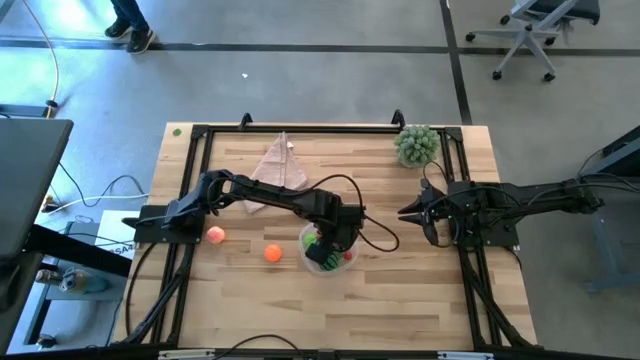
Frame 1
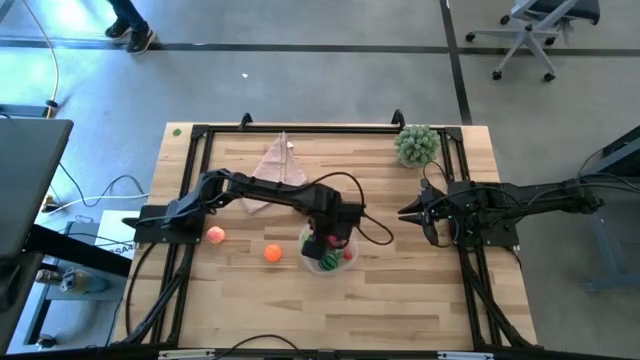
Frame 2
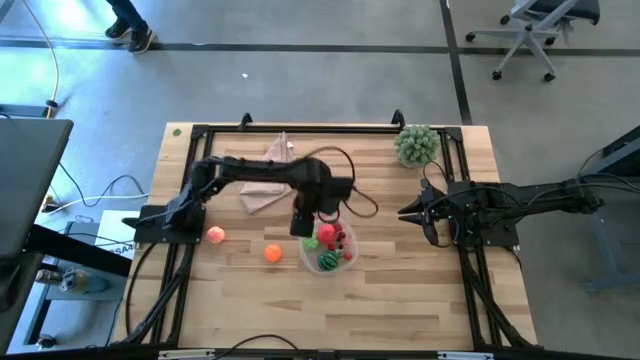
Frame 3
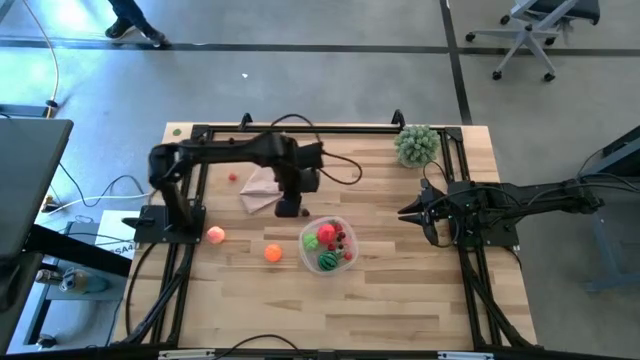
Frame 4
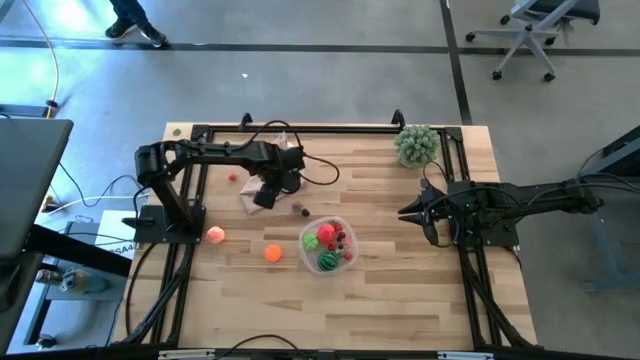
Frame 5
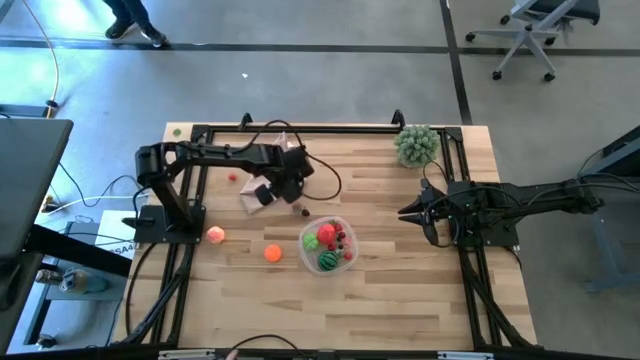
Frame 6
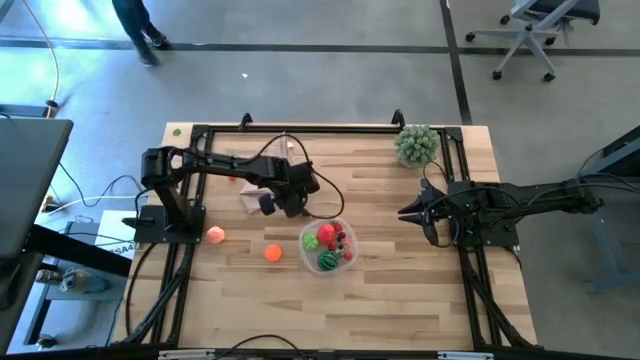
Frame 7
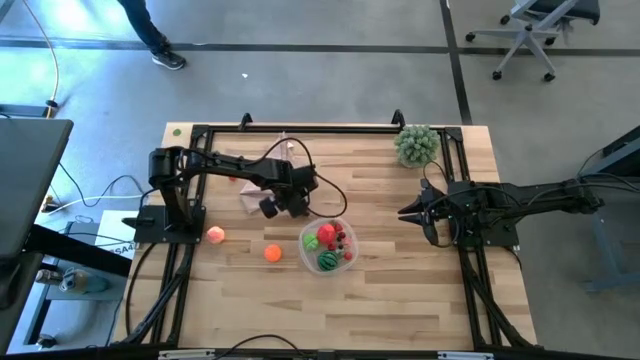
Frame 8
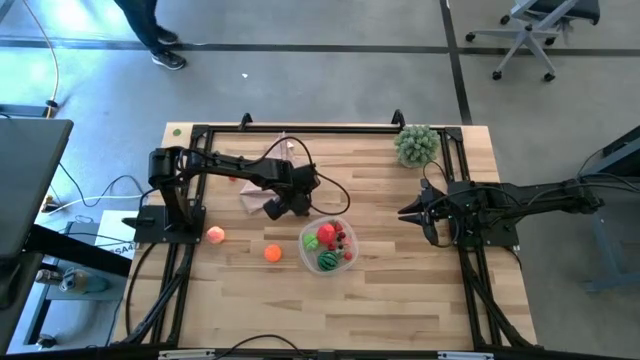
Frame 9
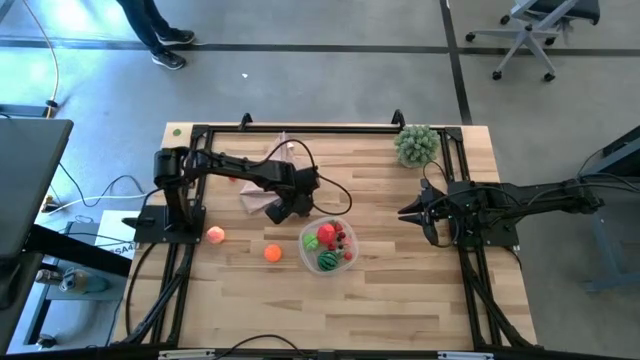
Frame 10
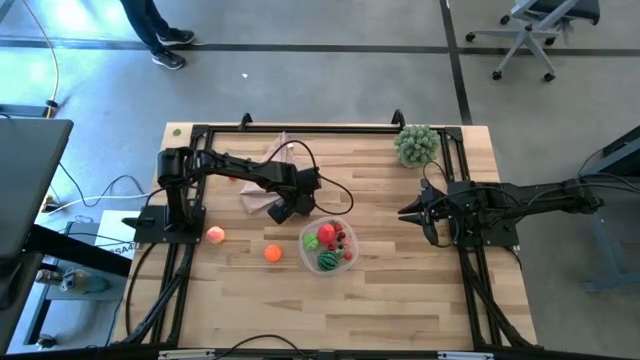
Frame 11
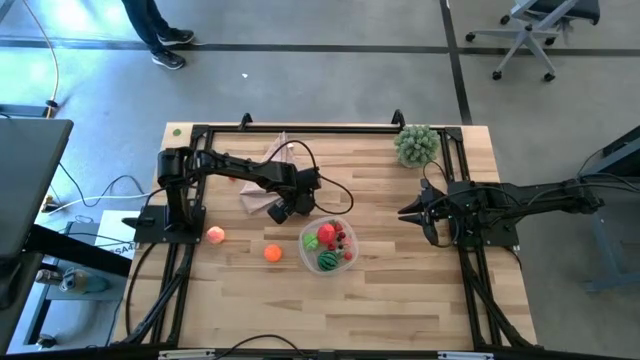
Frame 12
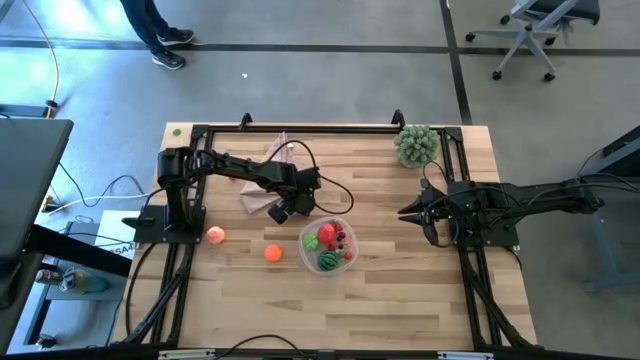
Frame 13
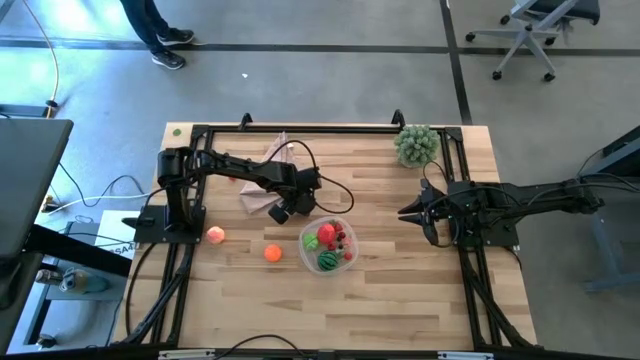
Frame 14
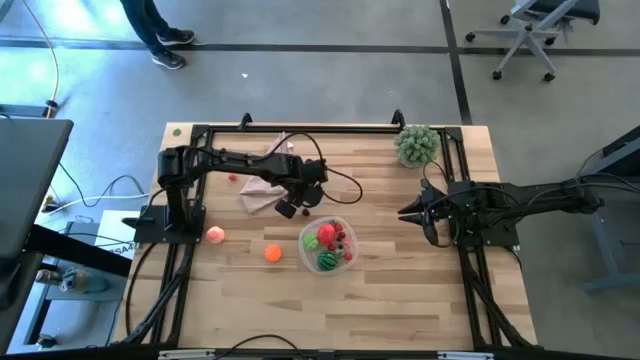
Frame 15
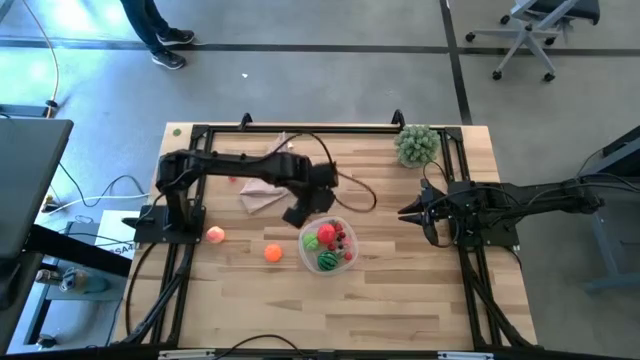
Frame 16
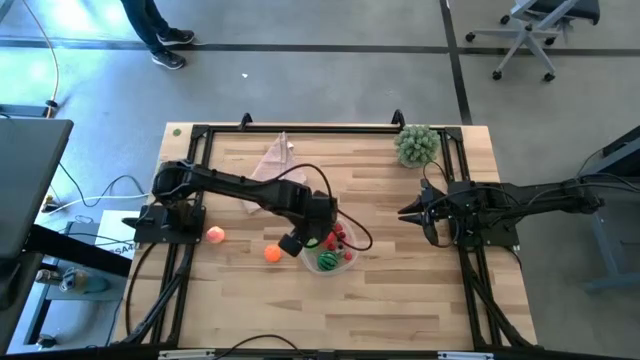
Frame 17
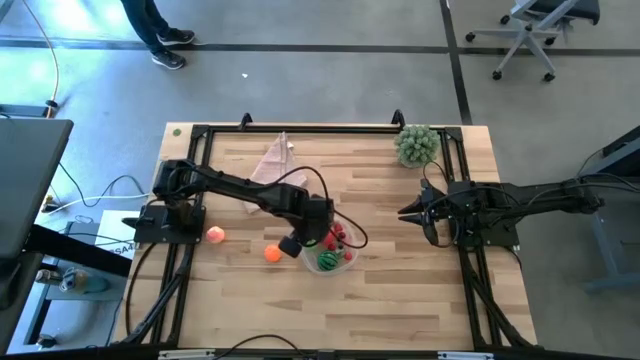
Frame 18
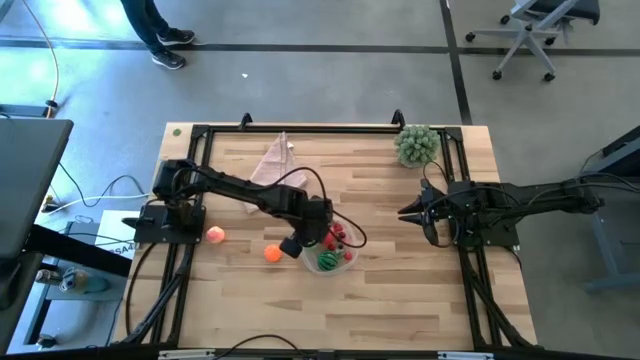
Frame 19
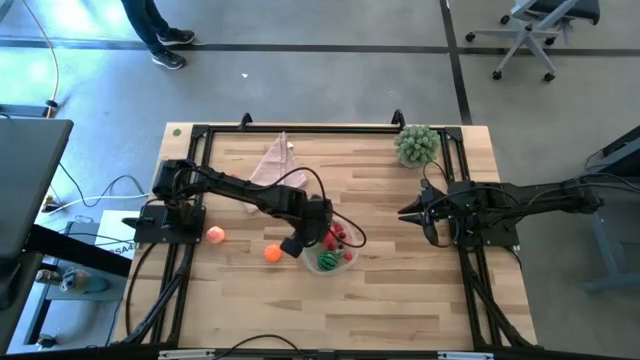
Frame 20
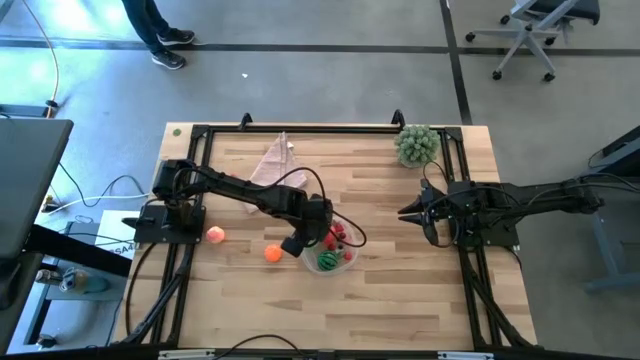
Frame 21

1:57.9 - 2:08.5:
Task: Pick and placing Produce into tupperware
Put the strawberry into the transparent bin

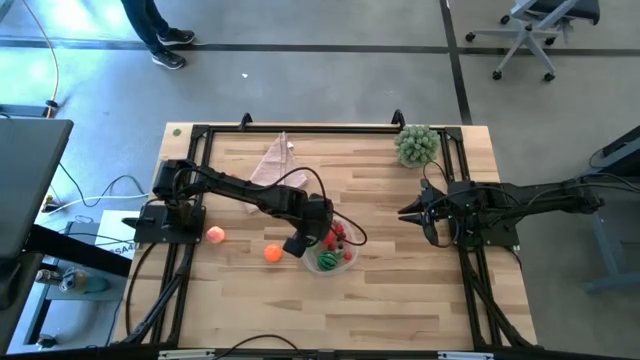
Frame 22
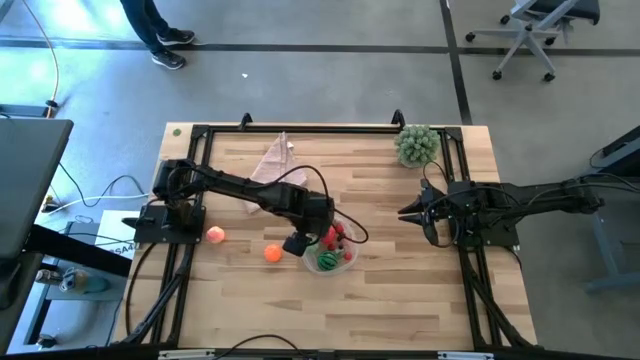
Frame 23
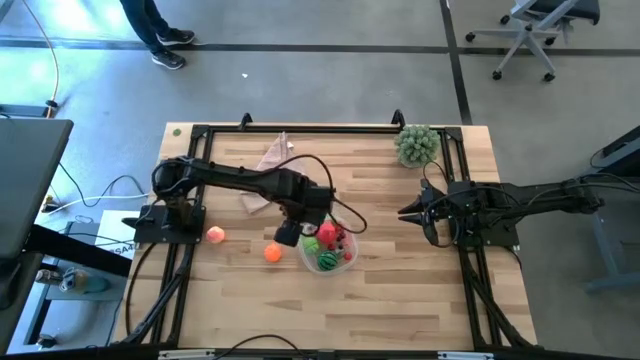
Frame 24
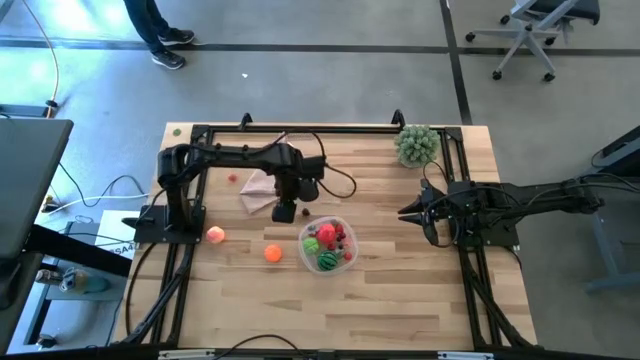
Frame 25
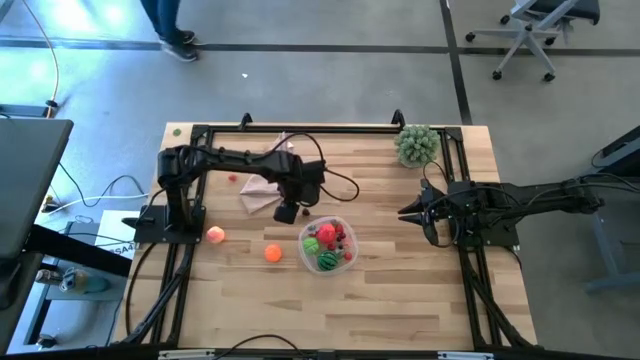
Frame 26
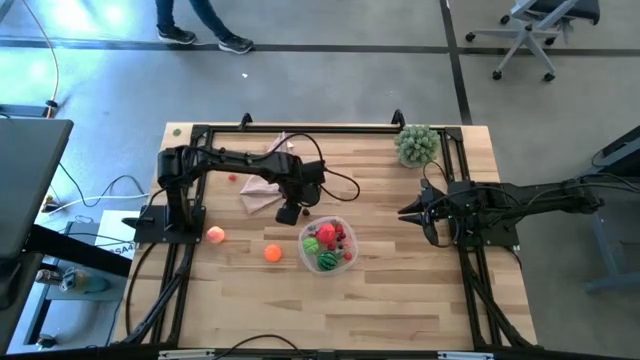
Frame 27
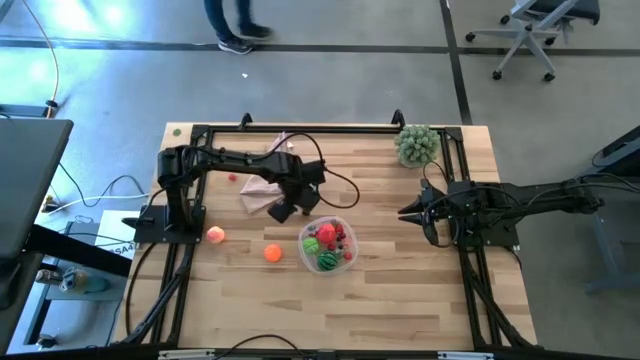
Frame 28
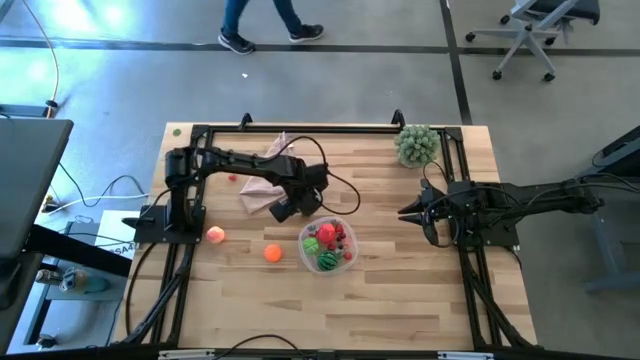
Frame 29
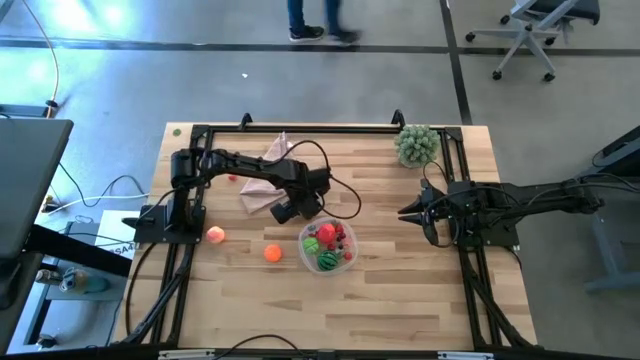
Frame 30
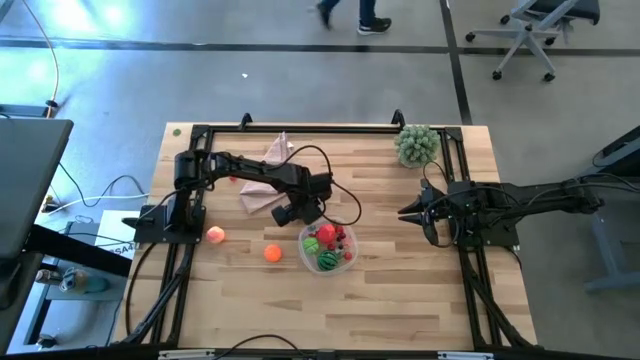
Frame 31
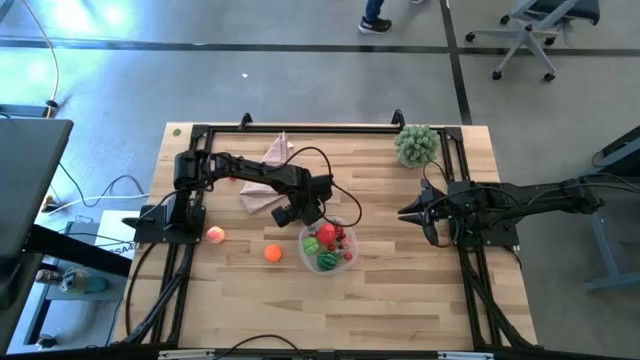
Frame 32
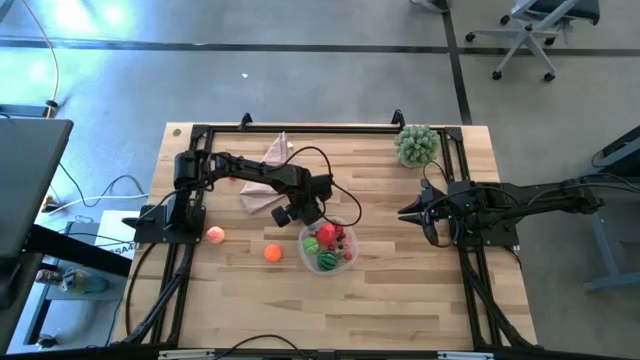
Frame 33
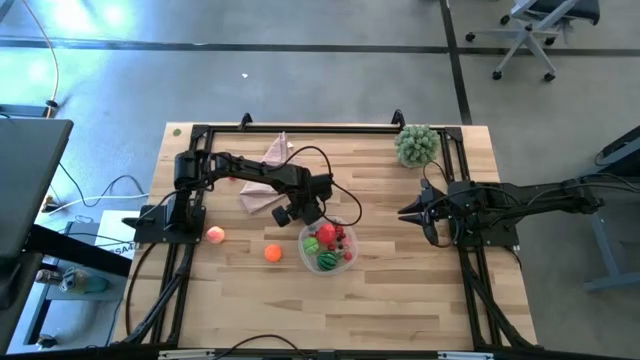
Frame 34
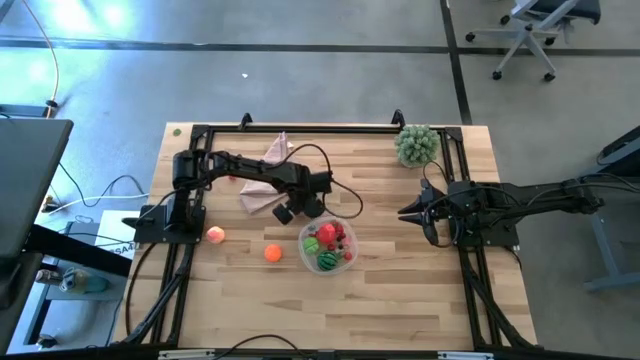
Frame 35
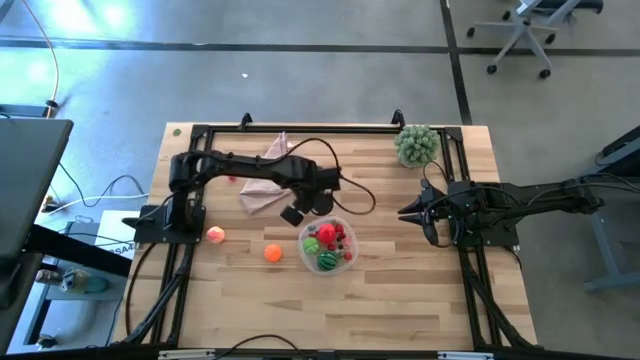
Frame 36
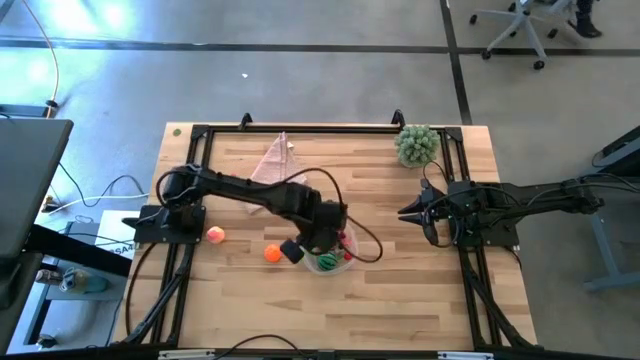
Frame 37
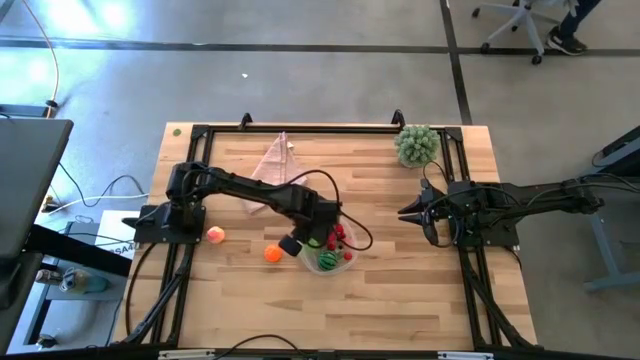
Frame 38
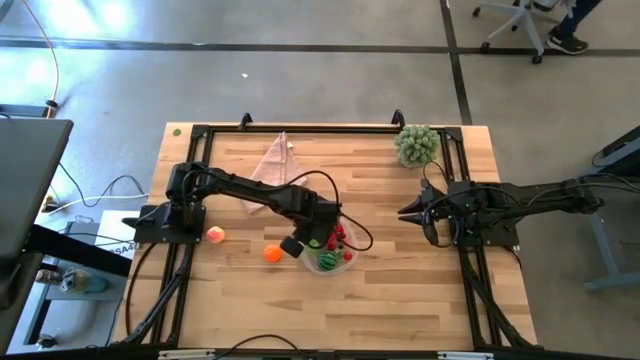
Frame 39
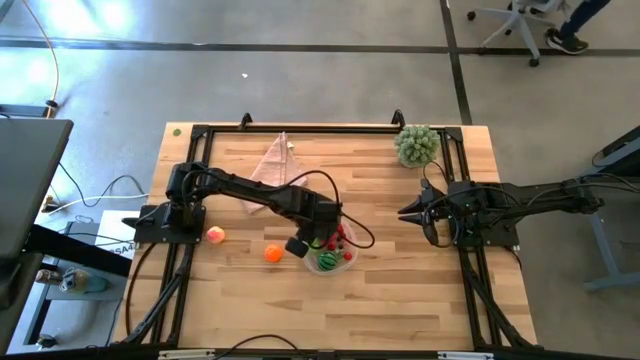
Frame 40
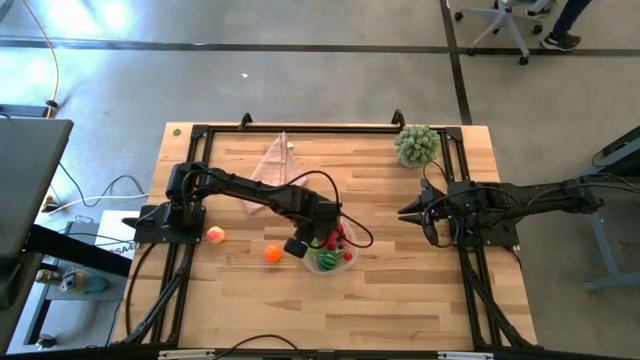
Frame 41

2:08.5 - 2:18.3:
Put the blackberry into the transparent bin

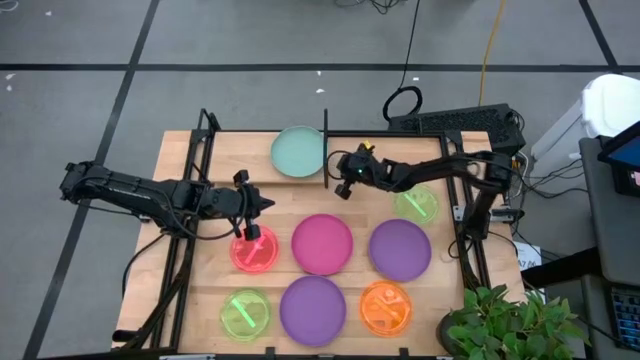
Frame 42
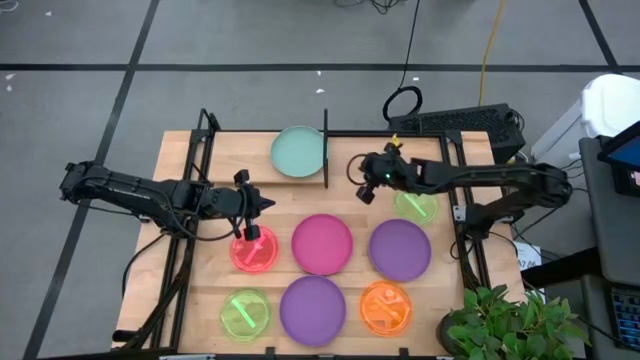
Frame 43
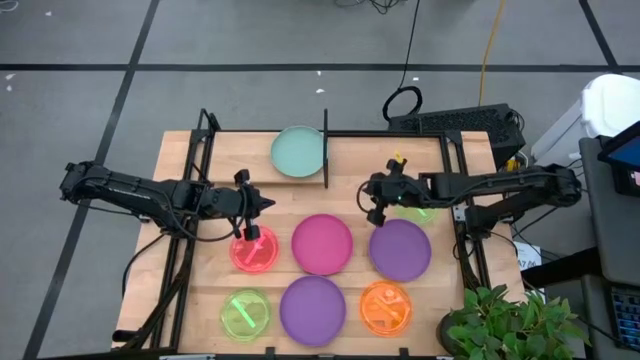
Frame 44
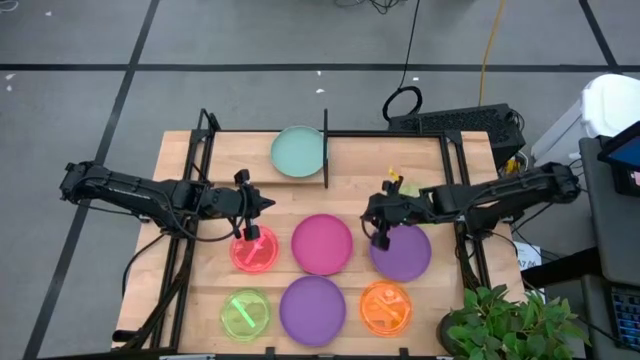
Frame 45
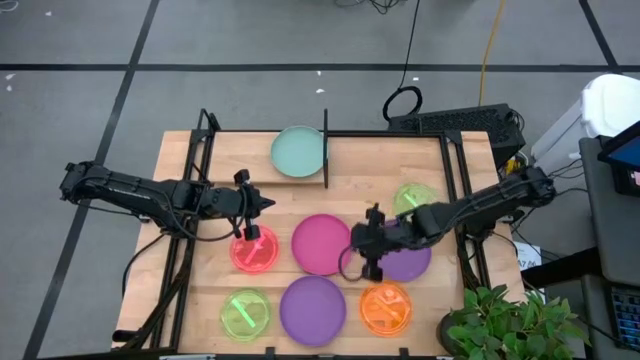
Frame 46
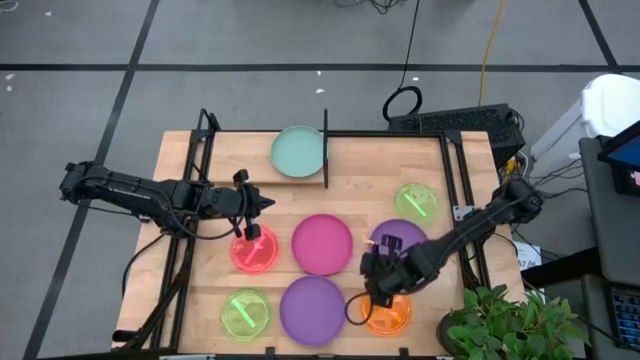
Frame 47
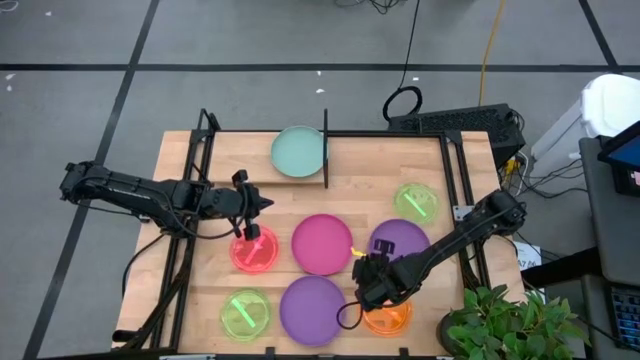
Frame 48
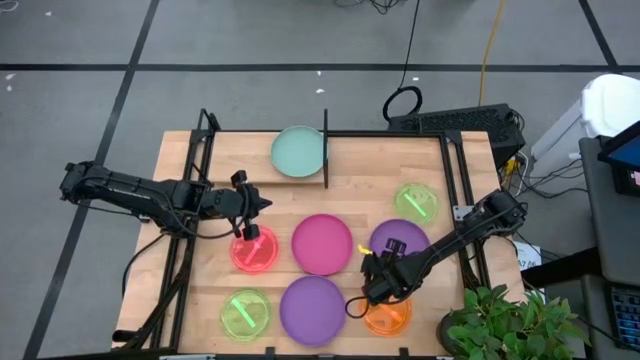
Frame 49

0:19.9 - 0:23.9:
Task: Place and stack plates onto a shelf
Adjust the top right purple plate
